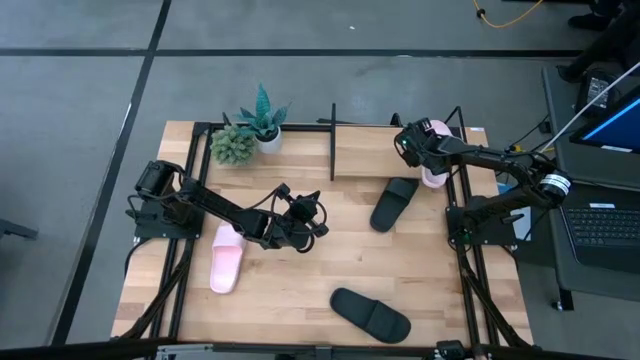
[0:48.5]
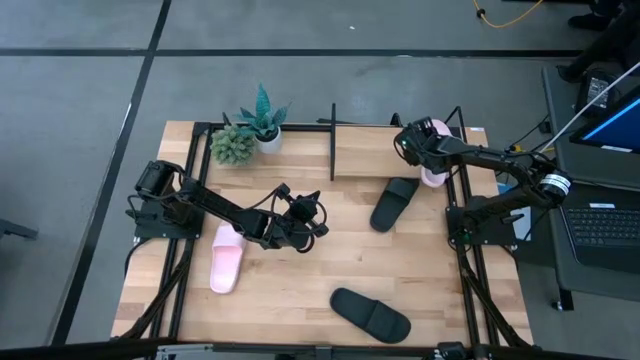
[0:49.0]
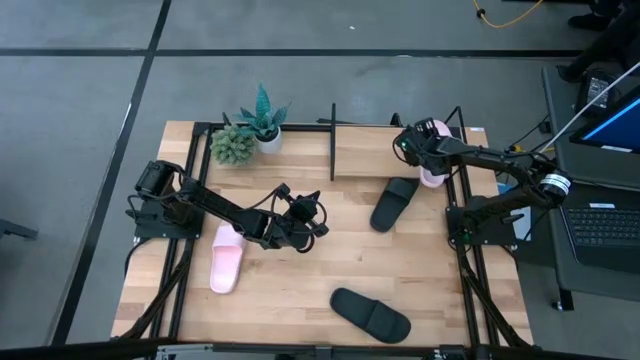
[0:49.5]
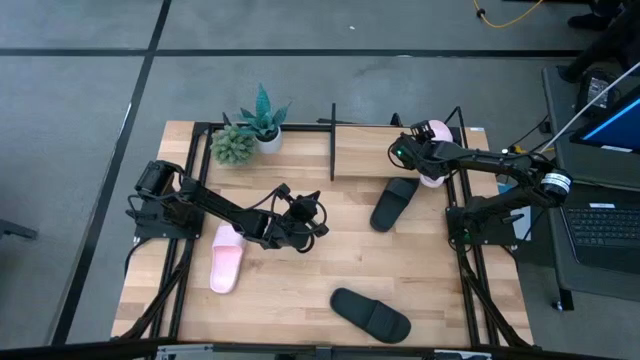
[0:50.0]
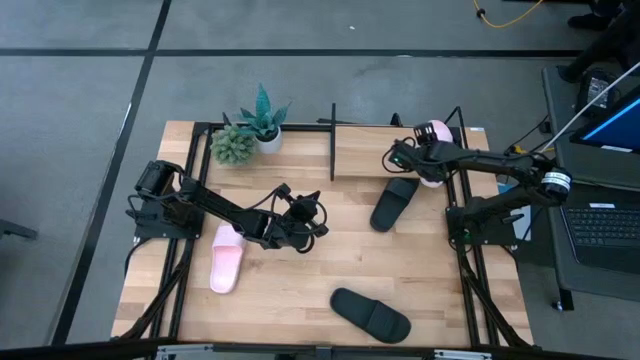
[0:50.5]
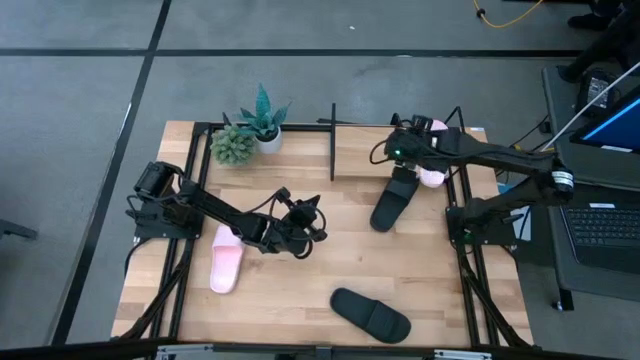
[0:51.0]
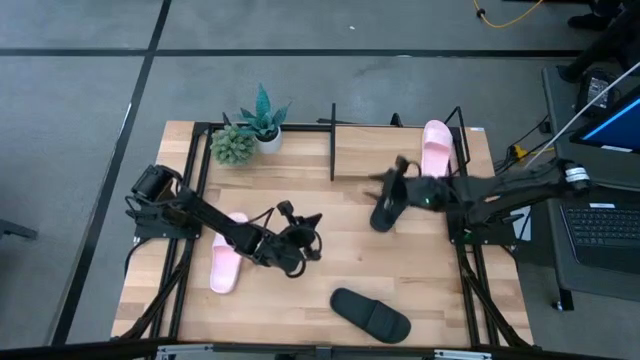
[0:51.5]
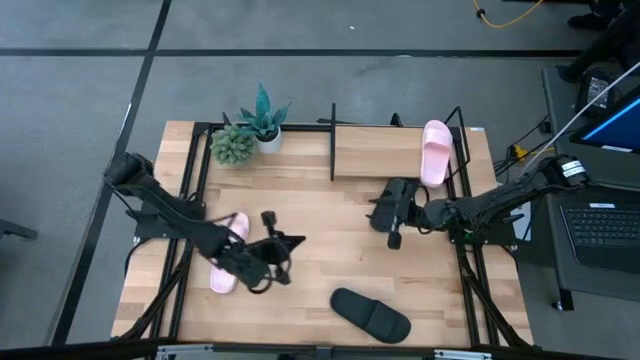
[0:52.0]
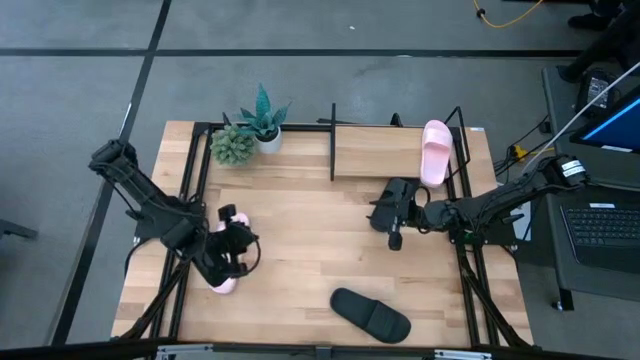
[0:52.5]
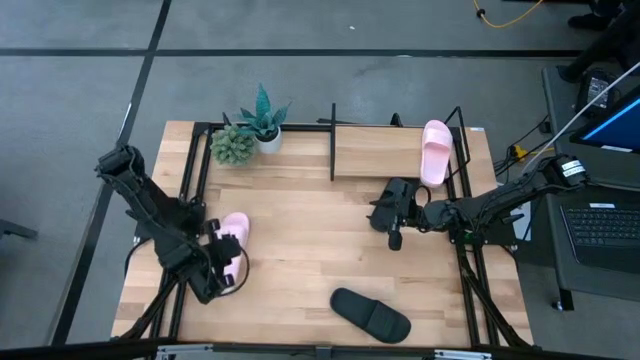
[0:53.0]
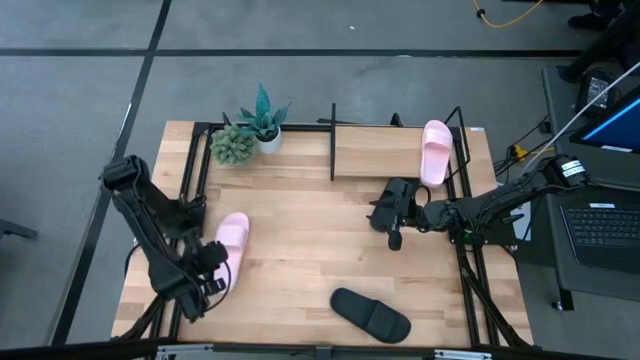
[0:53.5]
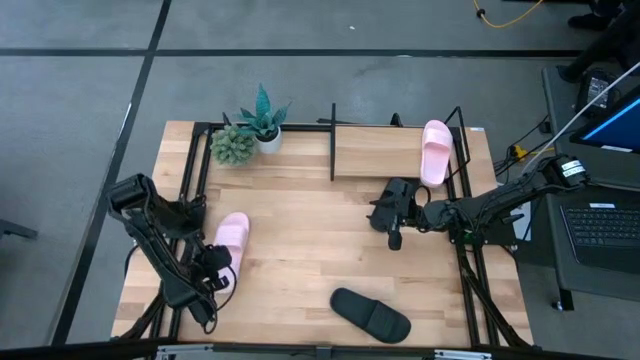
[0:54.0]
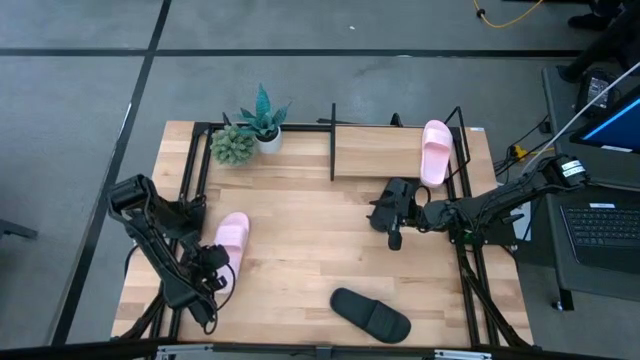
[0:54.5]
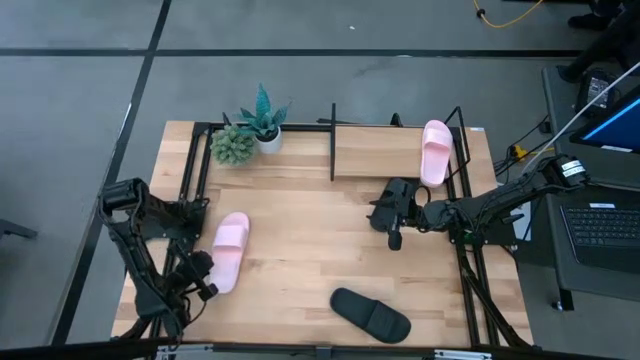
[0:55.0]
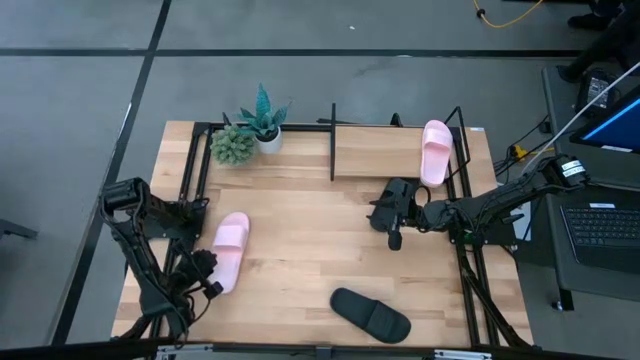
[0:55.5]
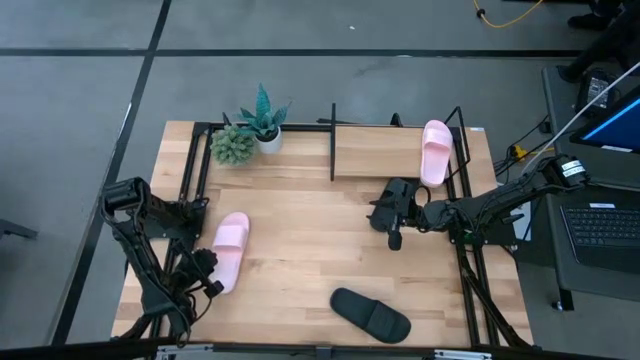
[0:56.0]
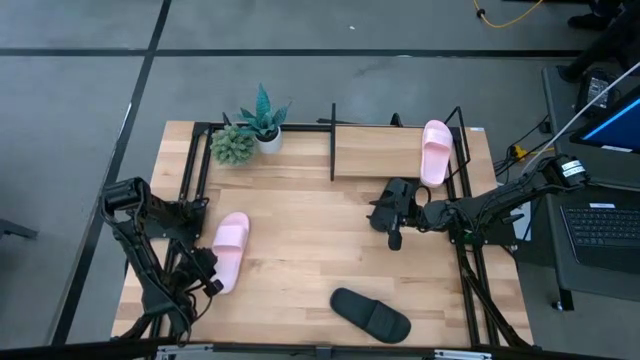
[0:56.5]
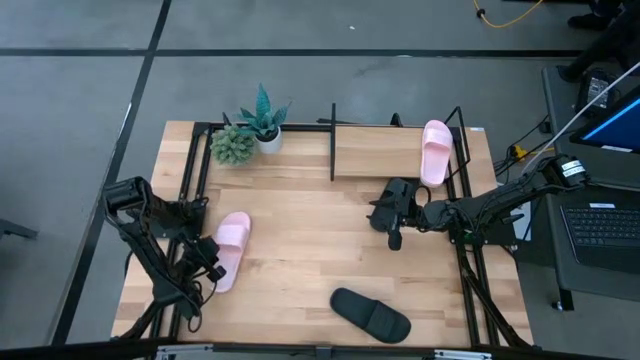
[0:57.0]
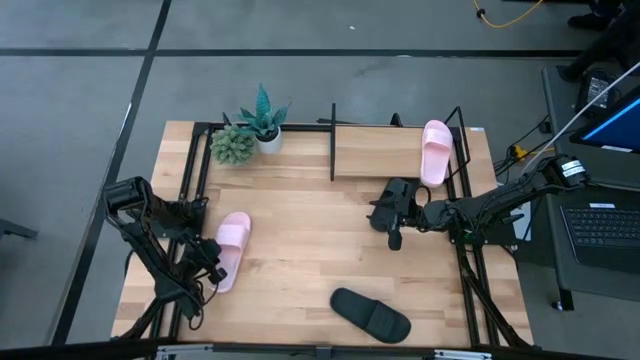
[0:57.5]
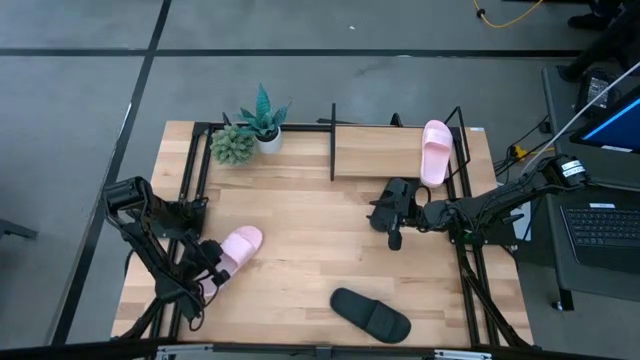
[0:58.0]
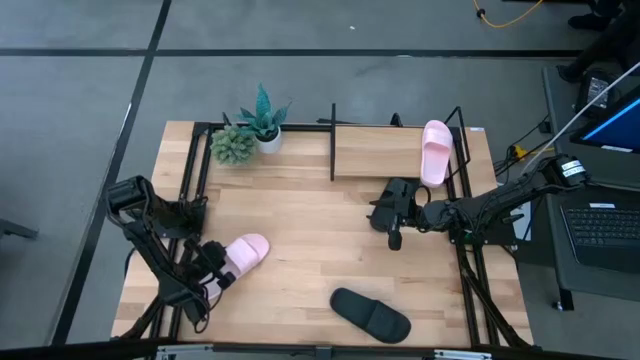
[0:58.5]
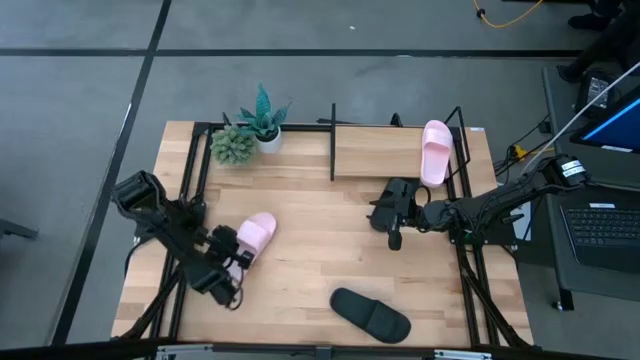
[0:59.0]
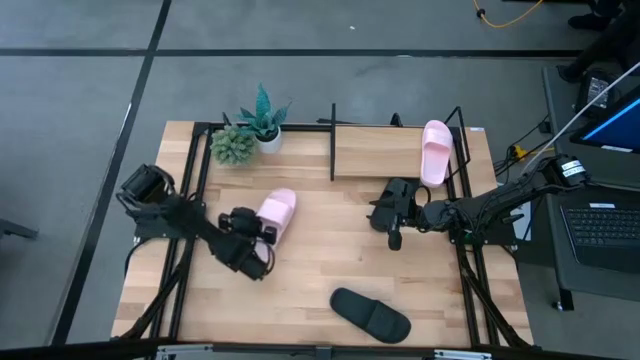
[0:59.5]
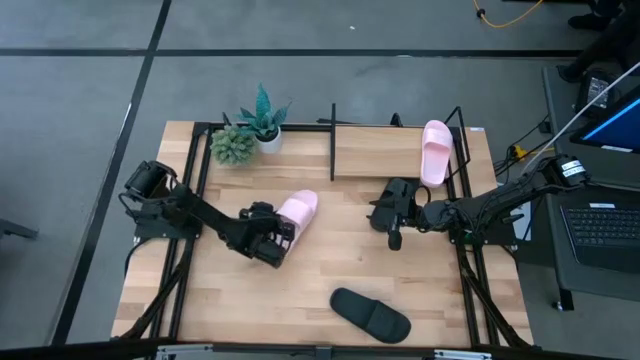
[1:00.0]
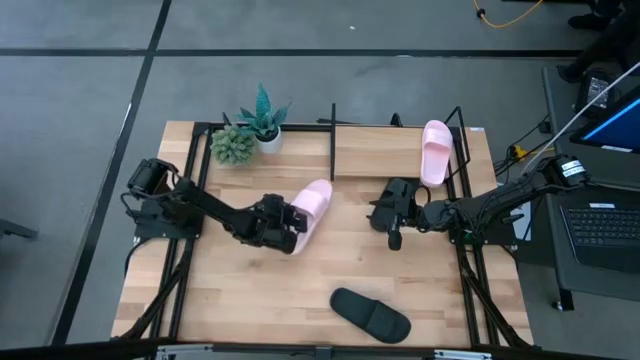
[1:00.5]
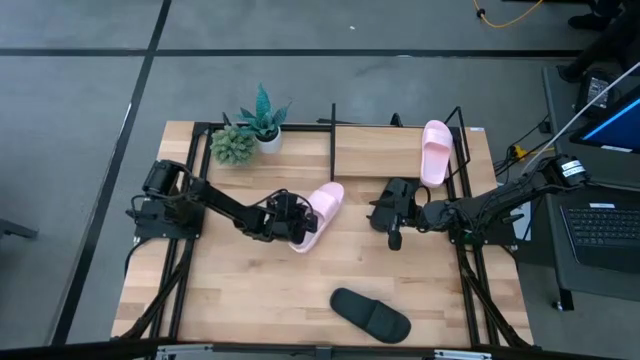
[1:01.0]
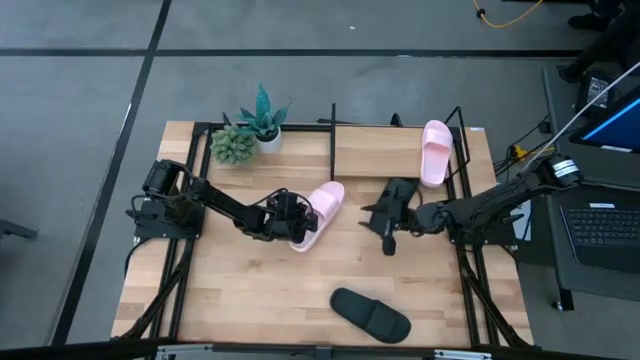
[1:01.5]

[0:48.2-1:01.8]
Task: Pick and place slides into the shelf
Put the pink slide on the shelf
